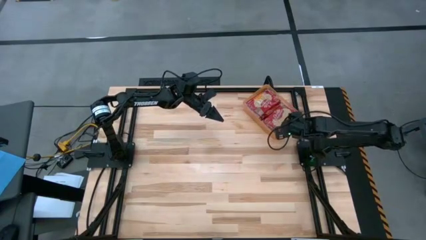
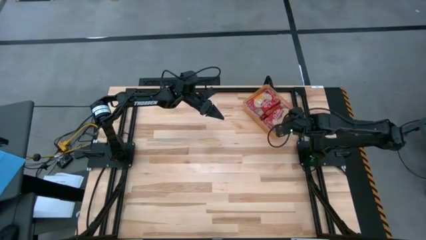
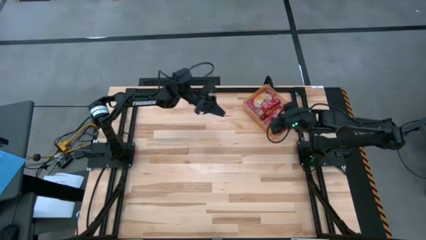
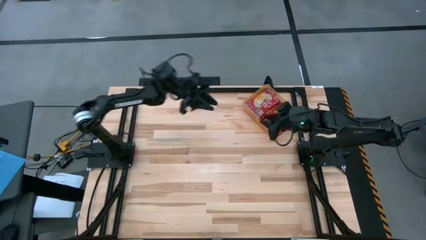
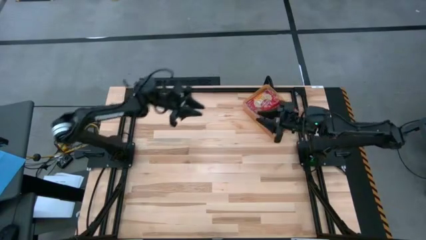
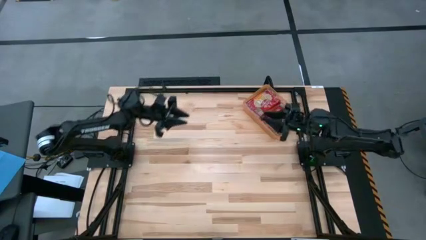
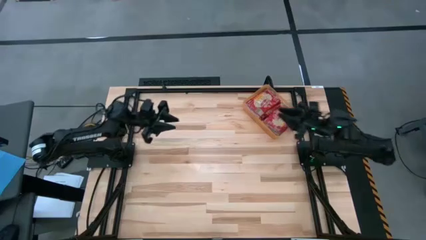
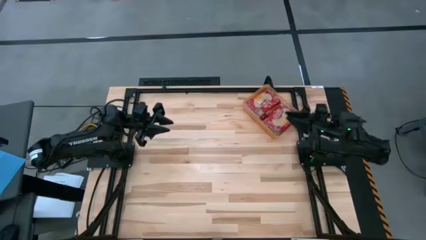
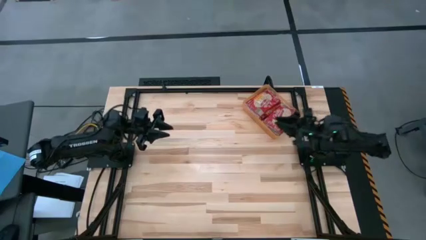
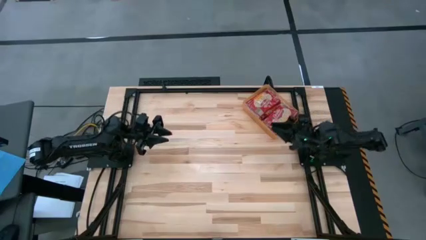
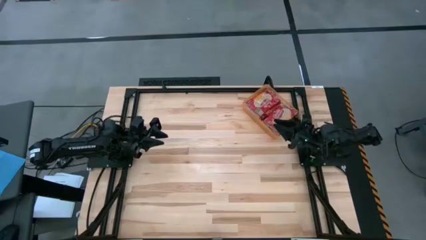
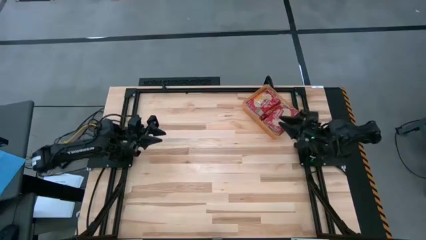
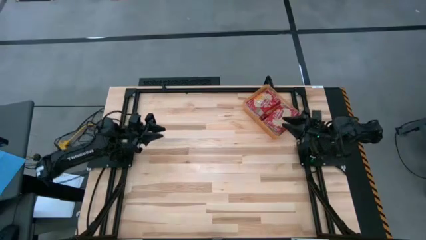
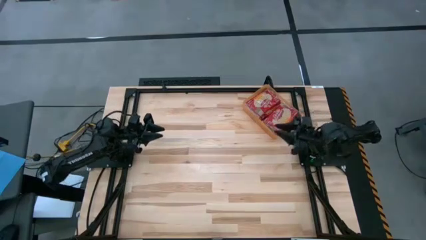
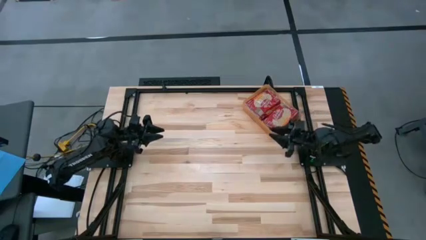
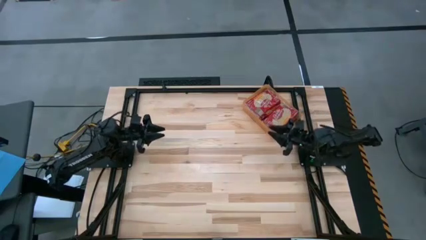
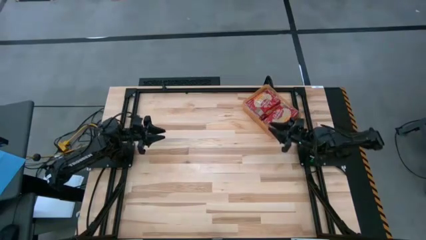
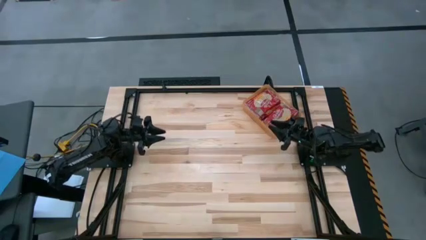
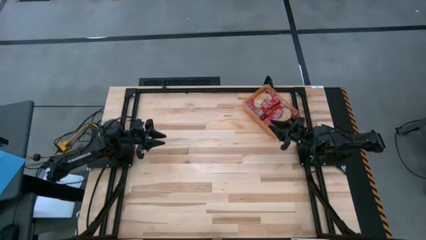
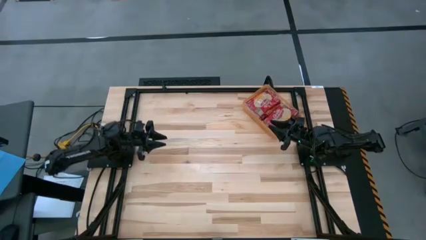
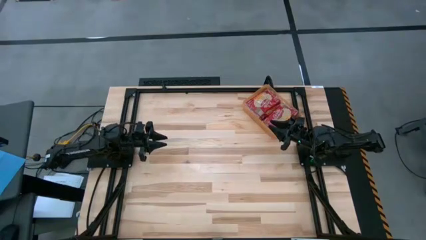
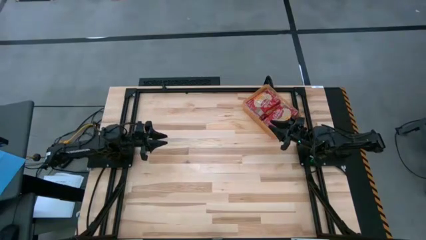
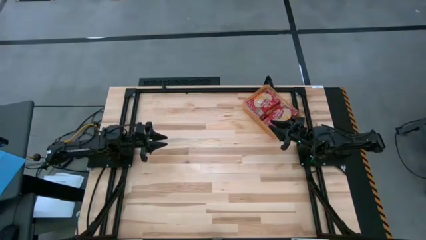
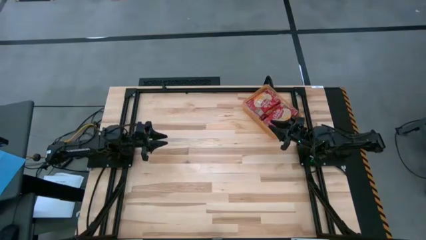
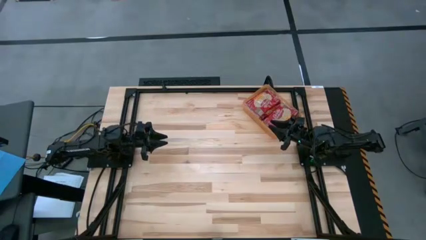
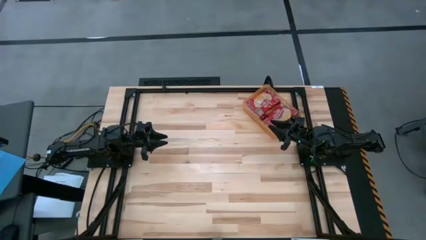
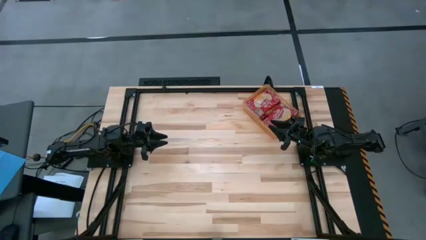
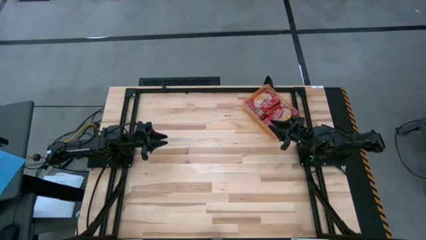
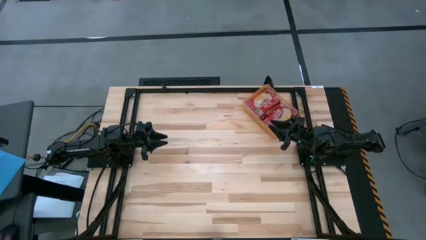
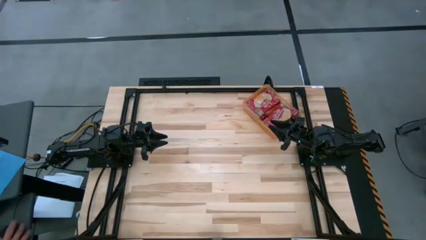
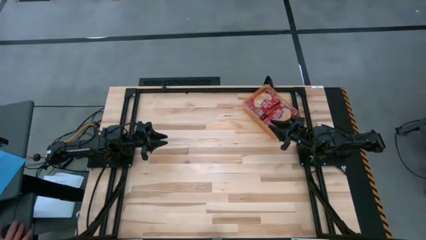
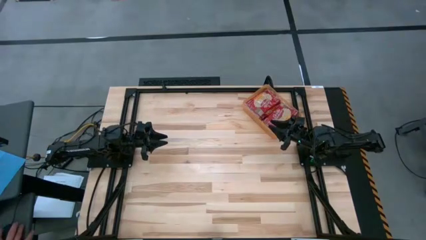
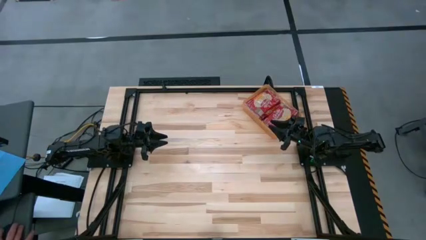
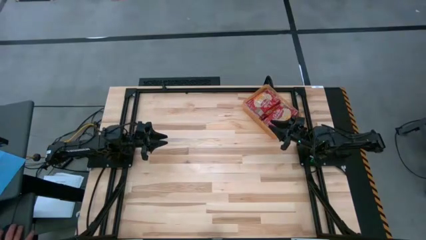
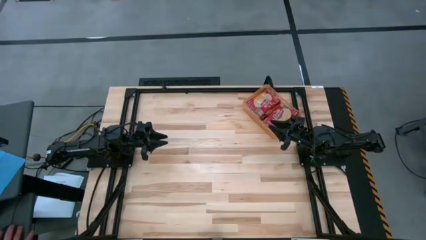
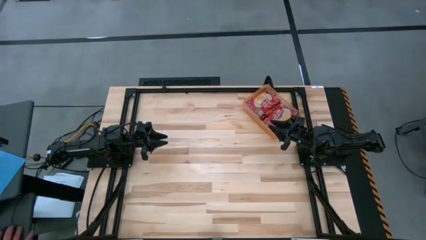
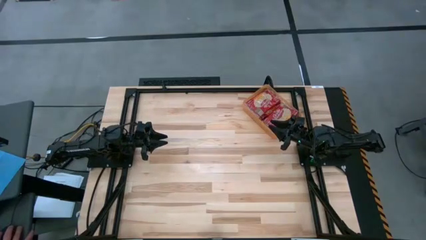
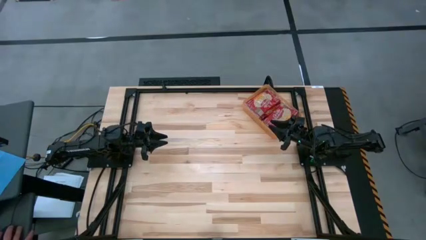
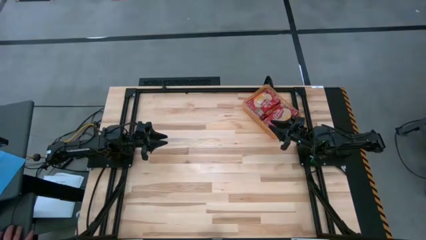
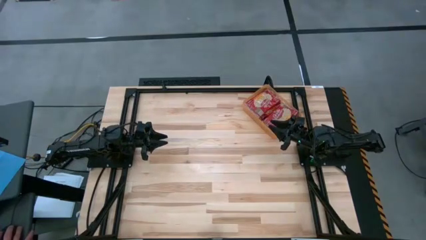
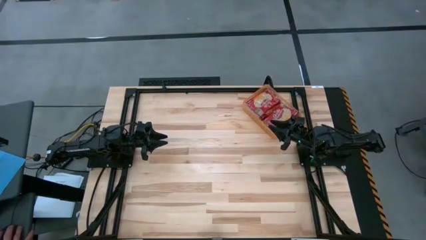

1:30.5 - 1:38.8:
Task: Sort popcorn bags into baskets
Return to Home Position

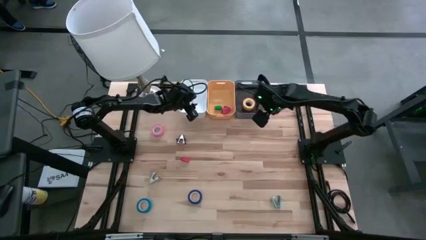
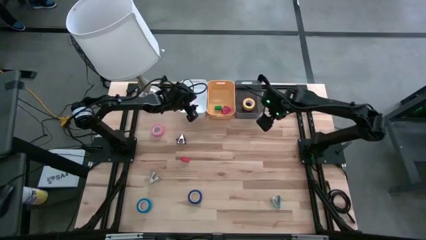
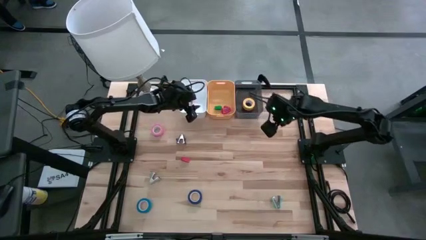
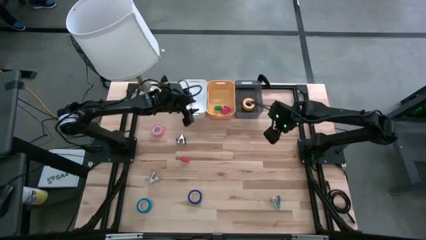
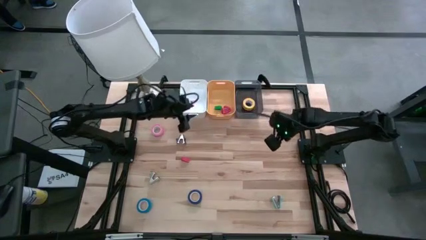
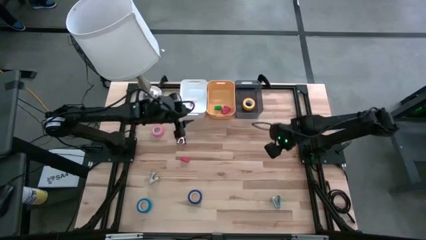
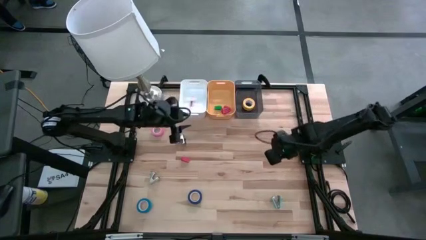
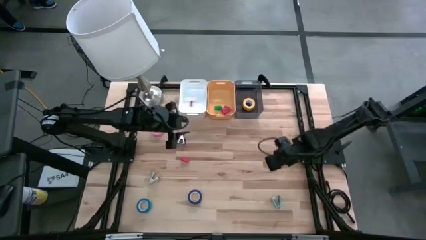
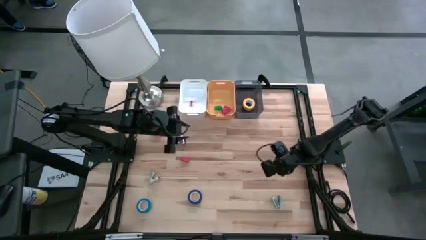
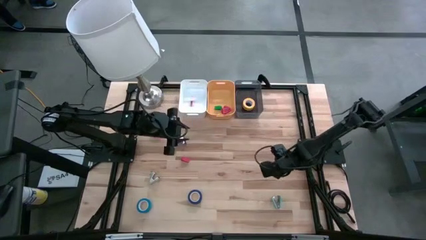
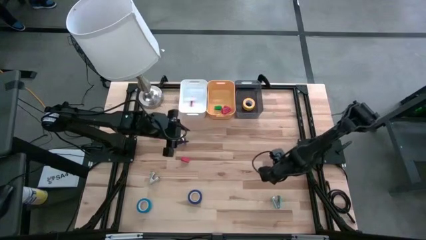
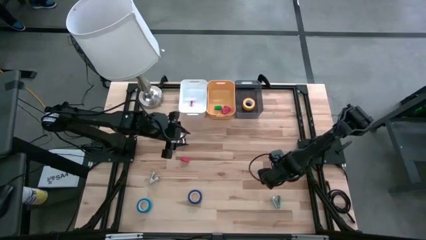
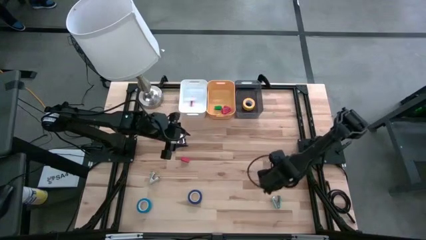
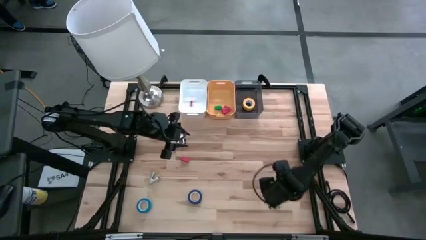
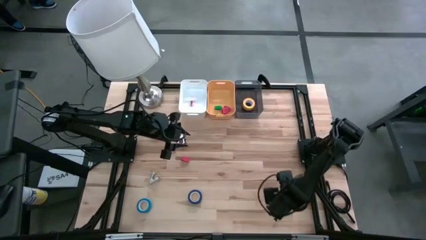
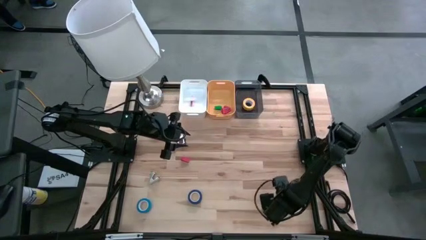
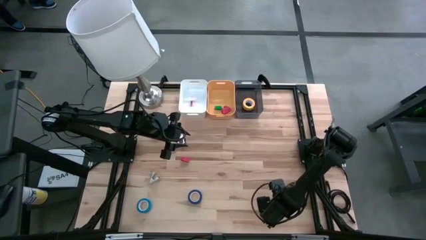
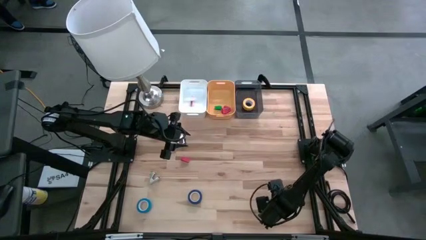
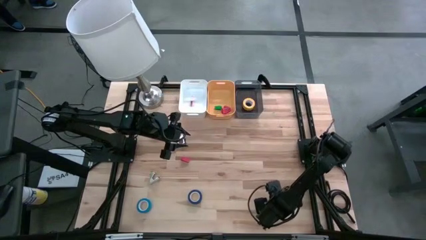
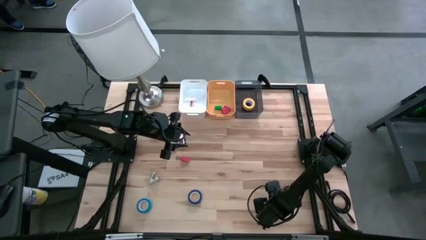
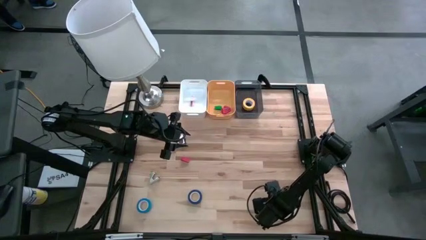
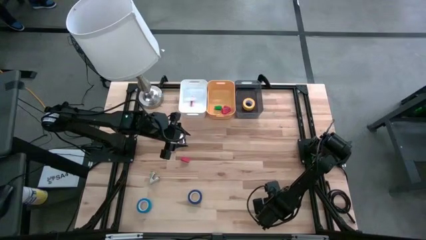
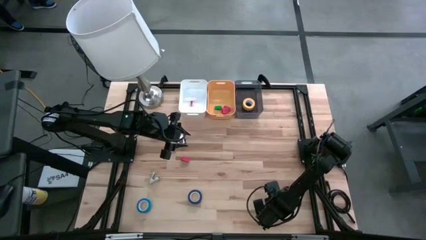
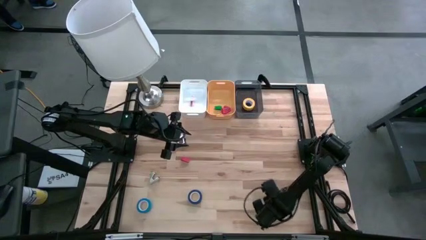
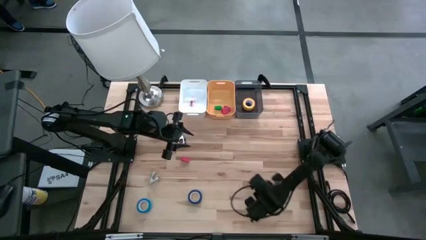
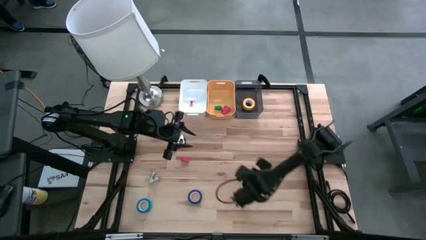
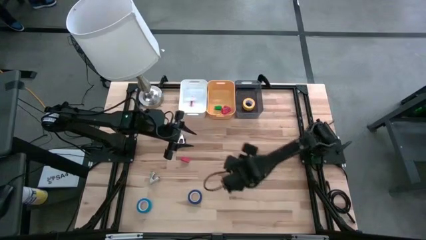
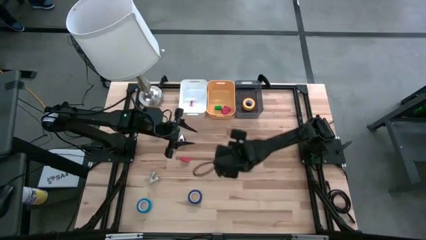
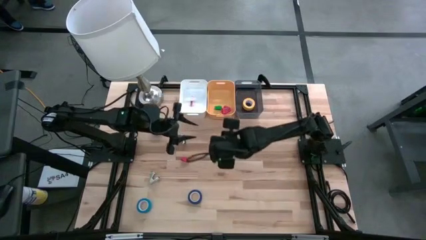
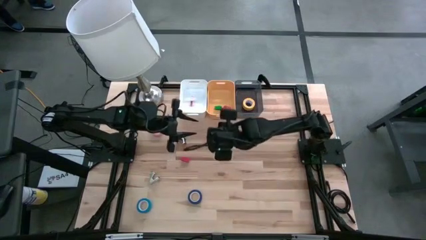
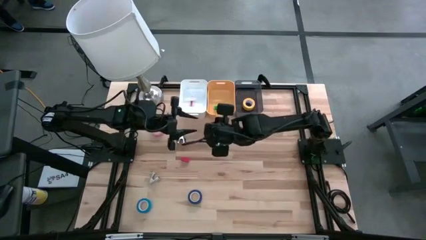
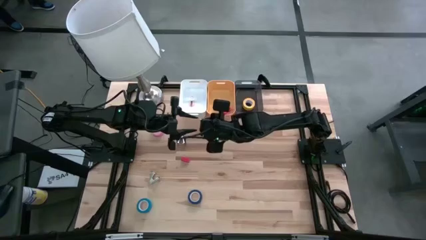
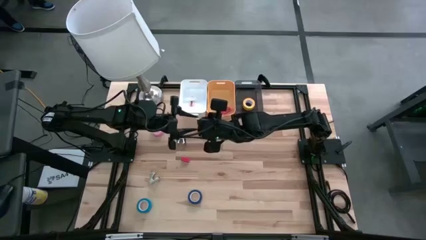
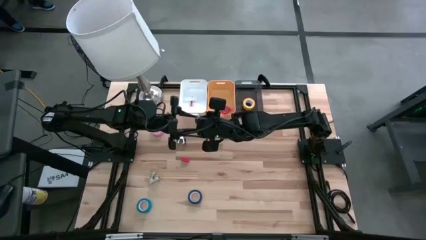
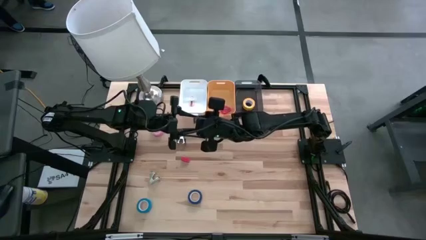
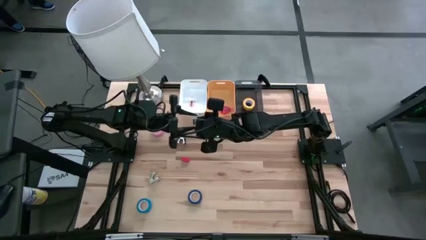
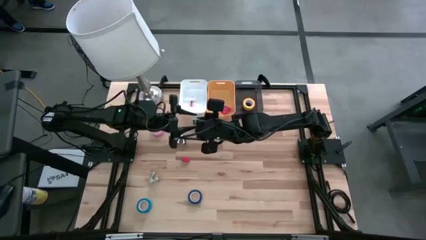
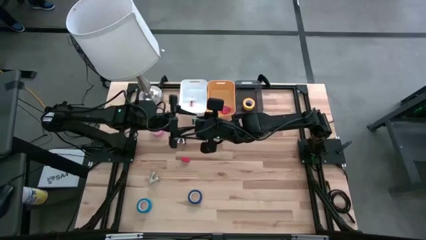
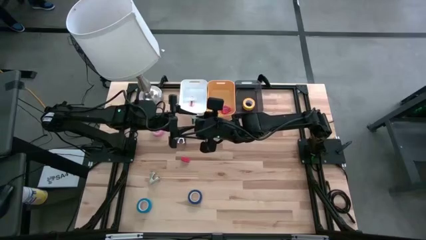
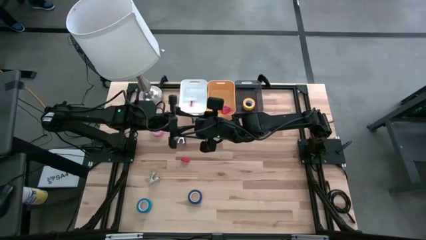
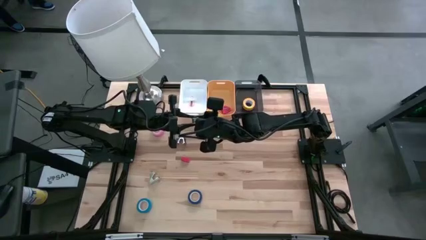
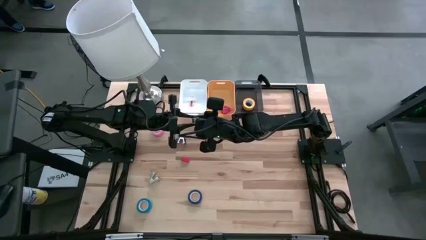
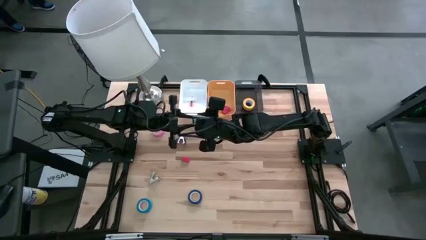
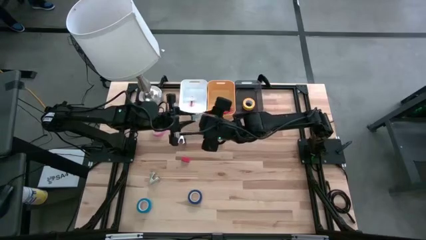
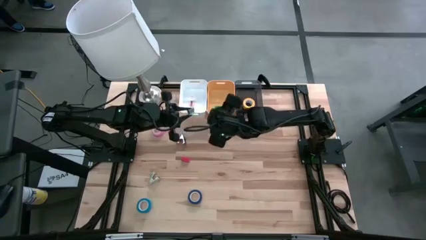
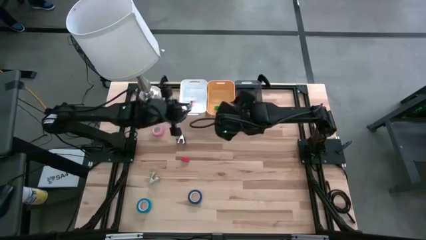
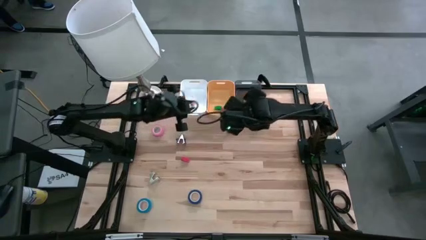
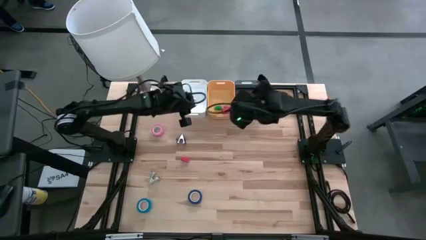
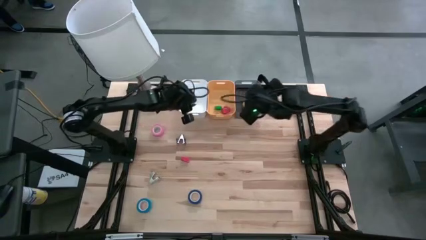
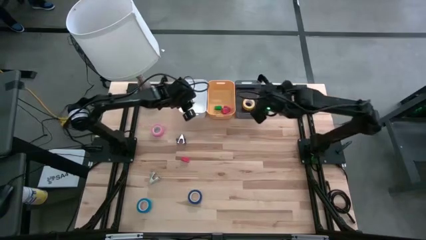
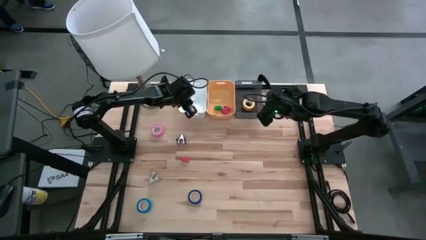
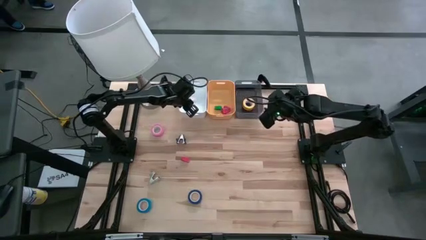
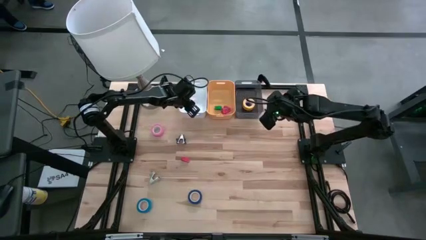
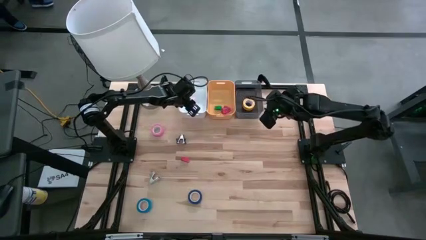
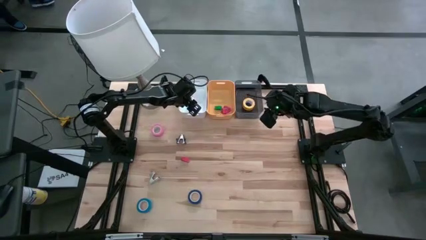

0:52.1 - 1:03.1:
Task: Pick and place Stapler, Stapler remover, tape
Put the light blue staple remover into the white bin
